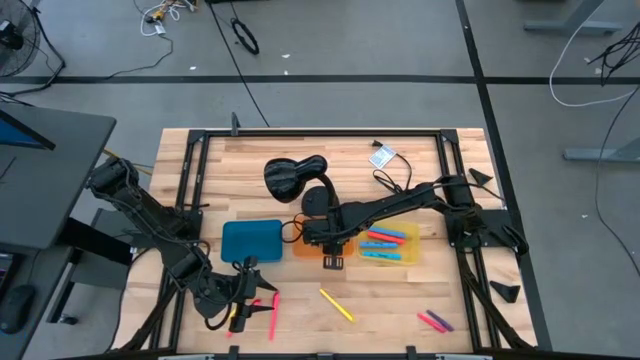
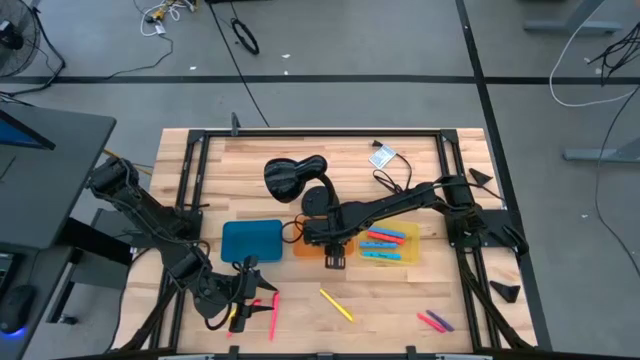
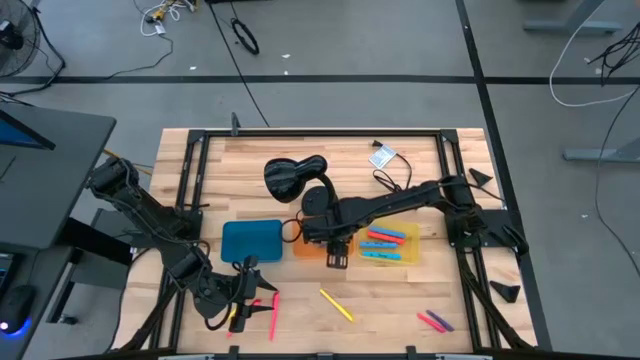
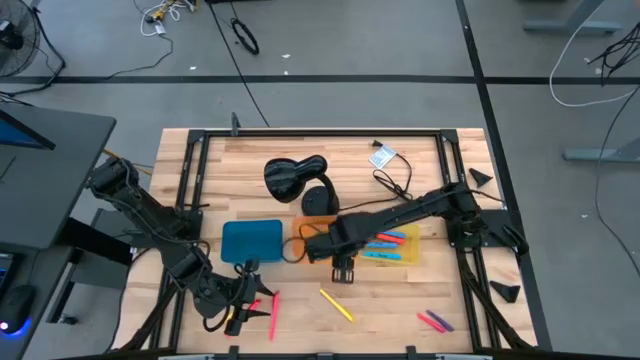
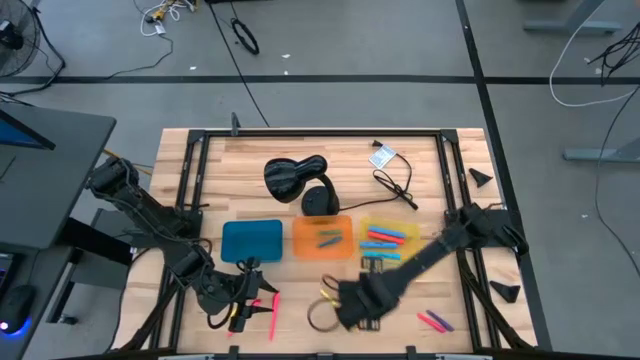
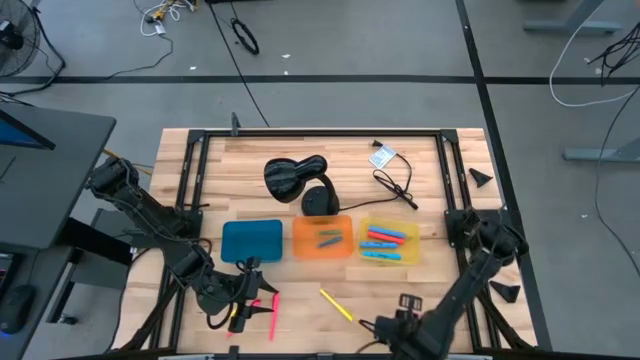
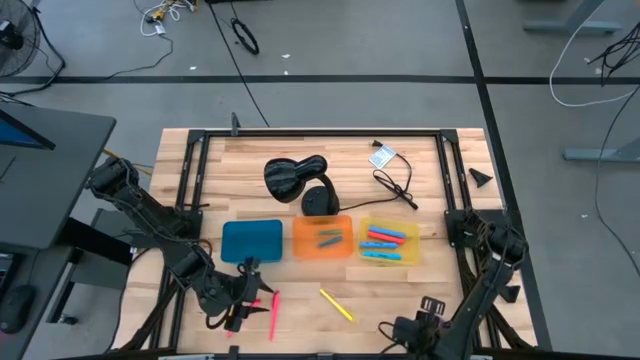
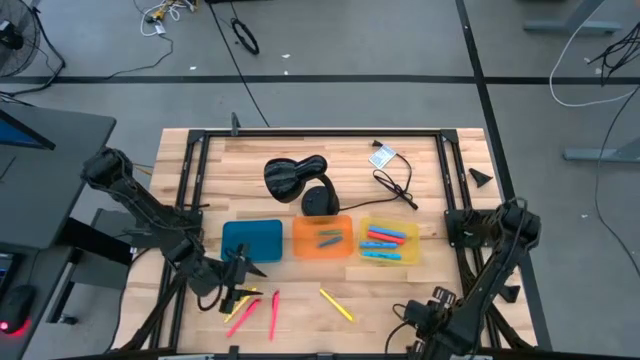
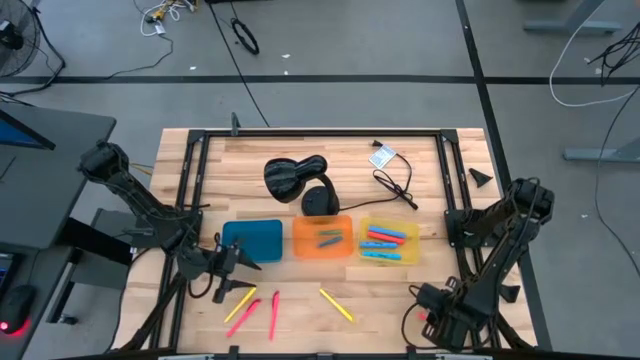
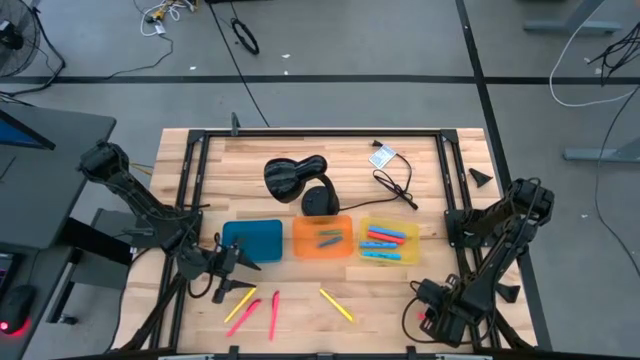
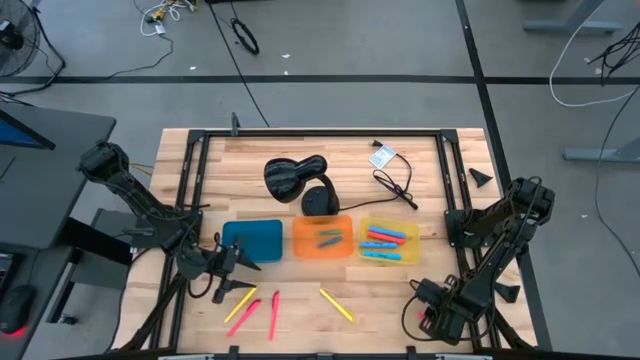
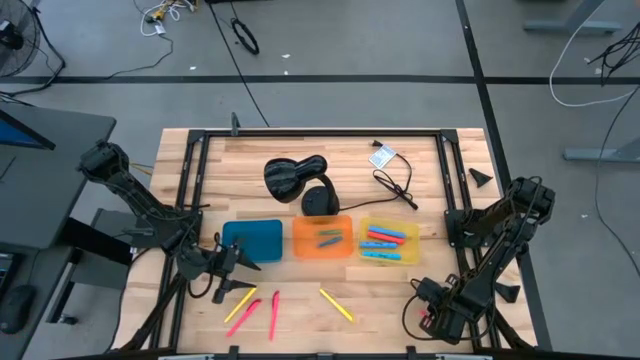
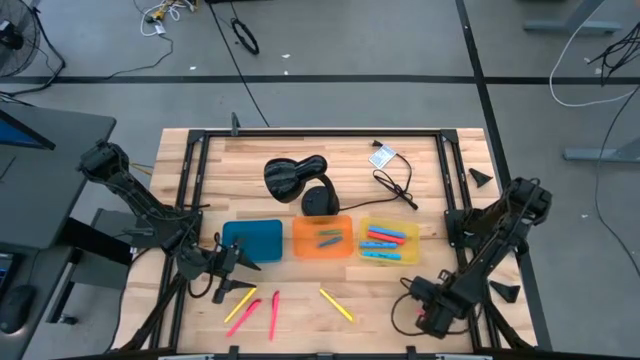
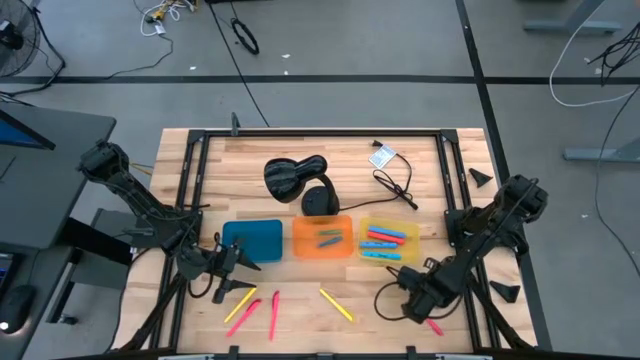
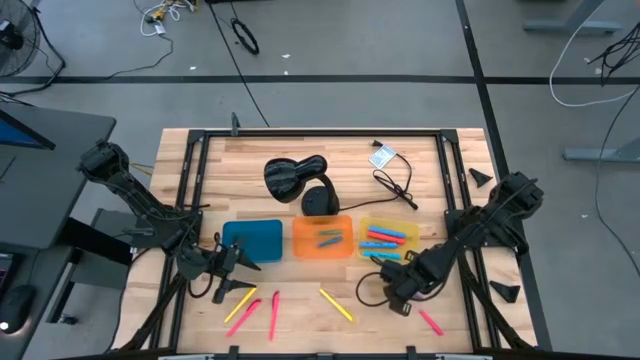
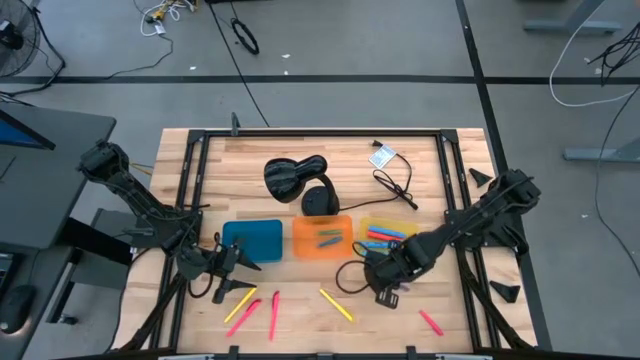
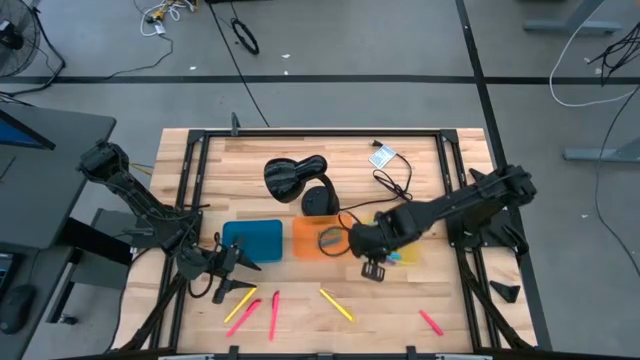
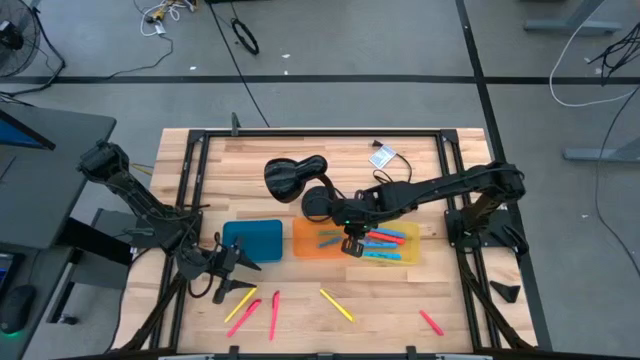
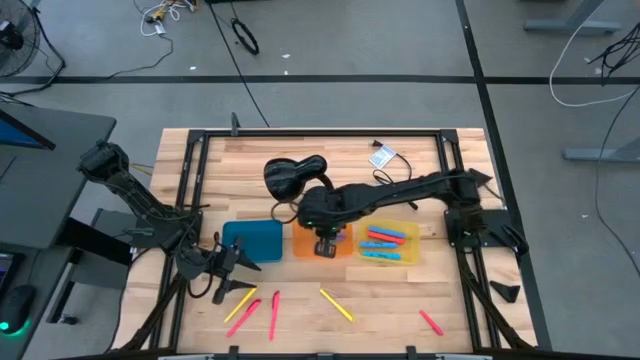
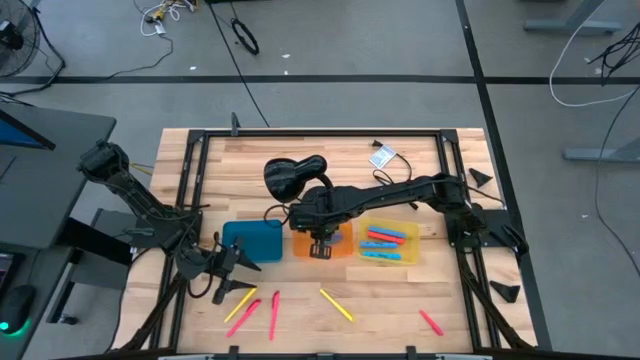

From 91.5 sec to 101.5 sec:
Task: Pick & Place Markers
Put the purple pen into the orange bin

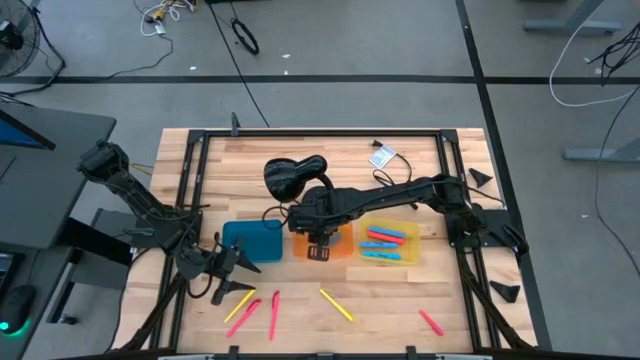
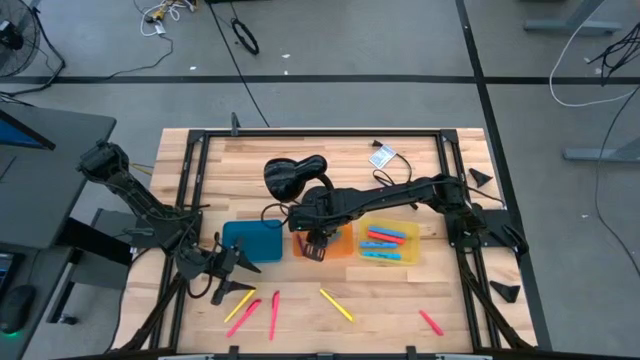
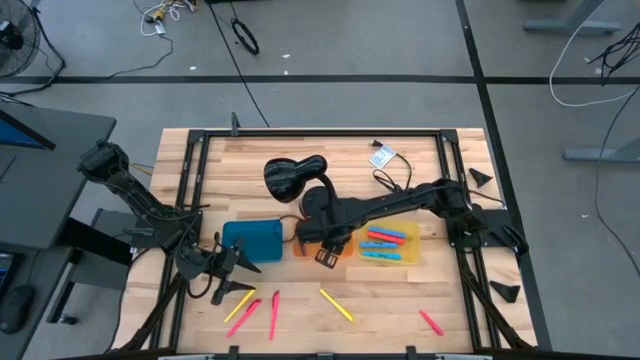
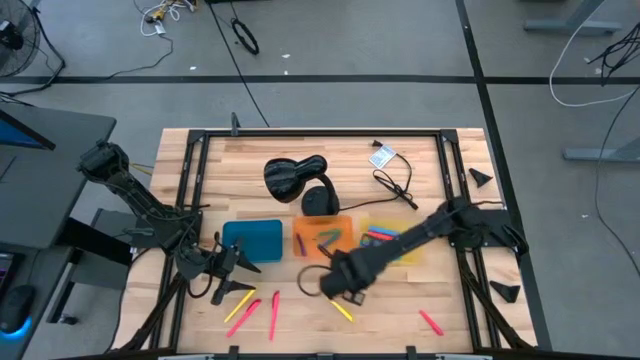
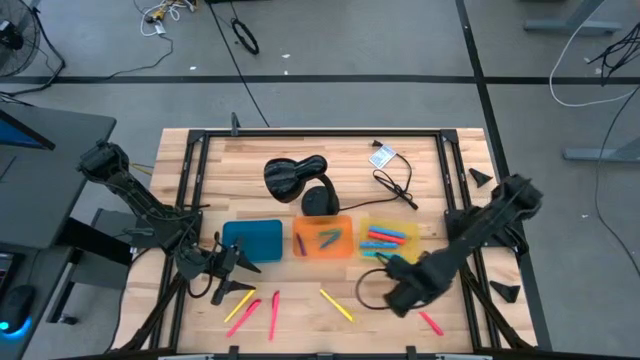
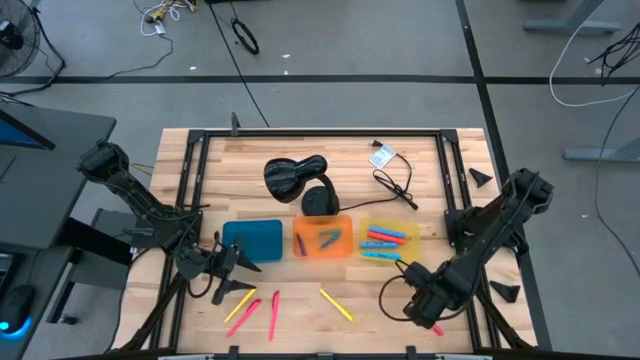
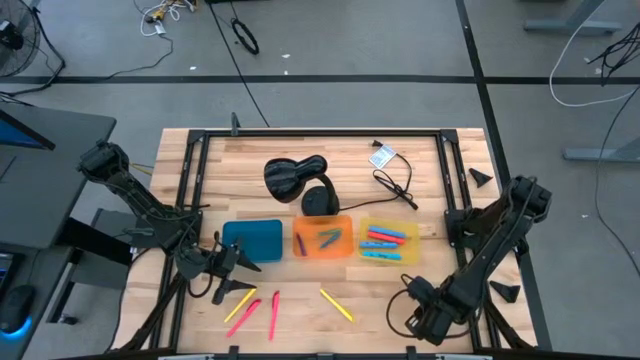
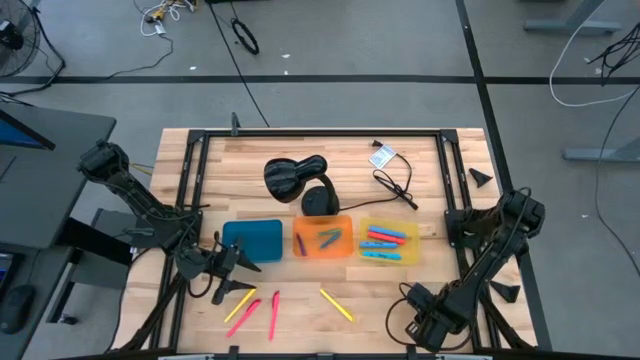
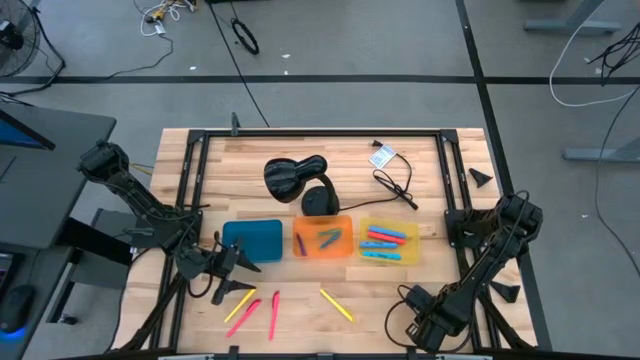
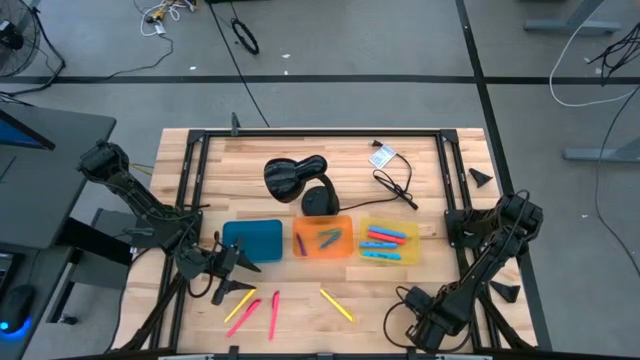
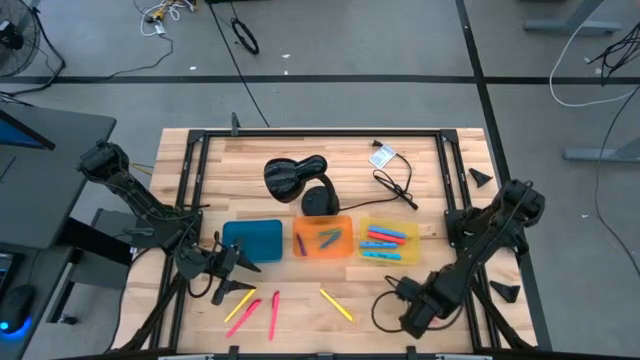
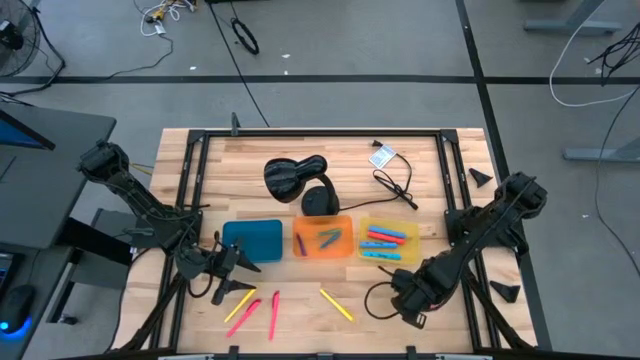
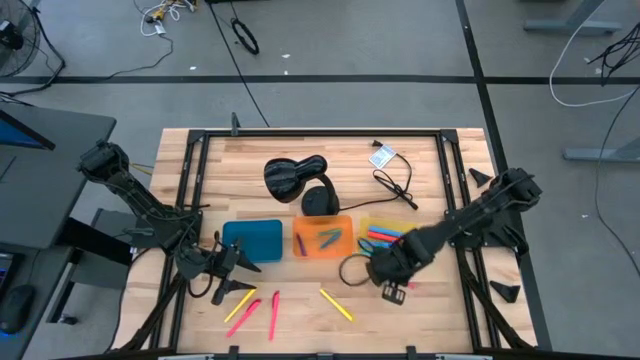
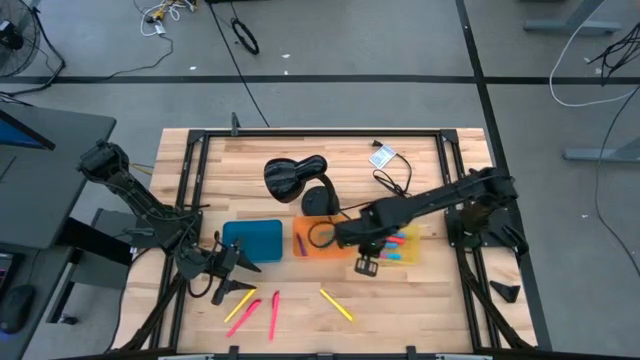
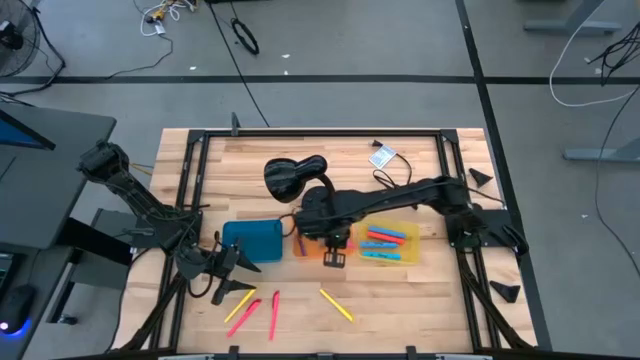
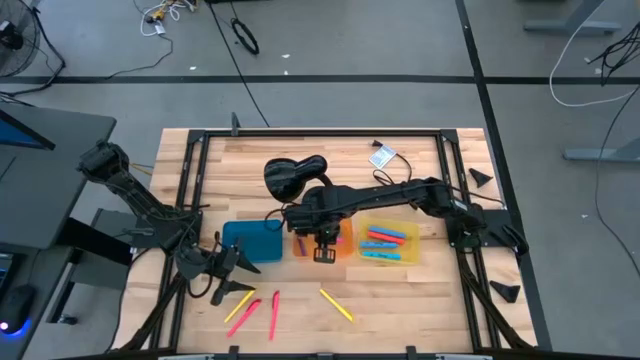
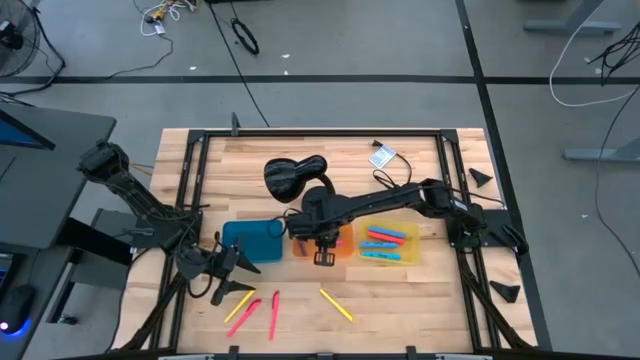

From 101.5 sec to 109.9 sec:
Put the pink pen into the orange bin

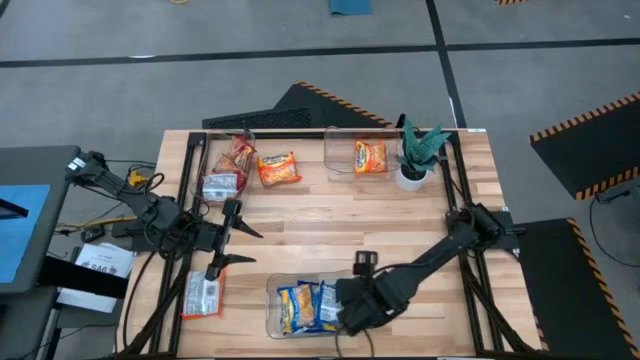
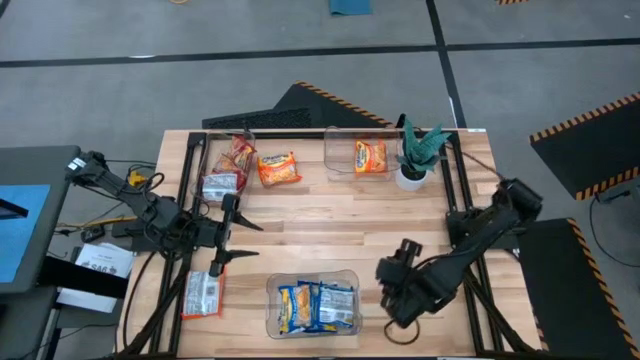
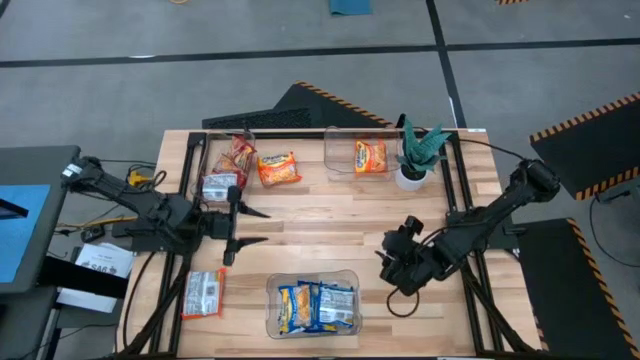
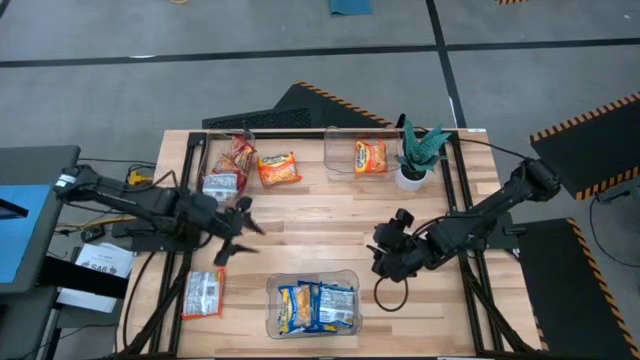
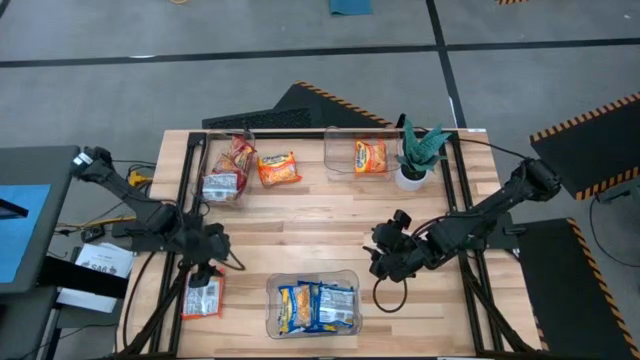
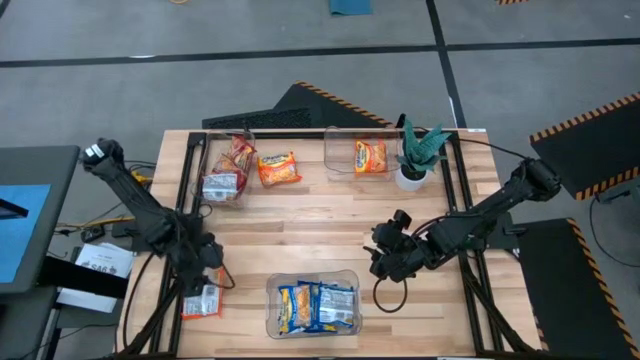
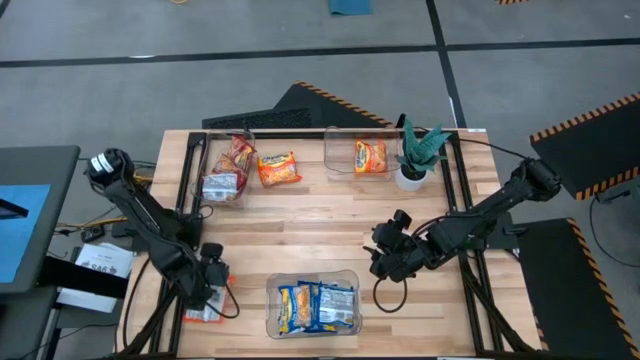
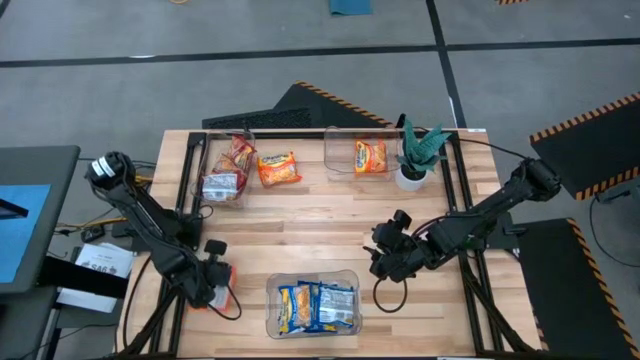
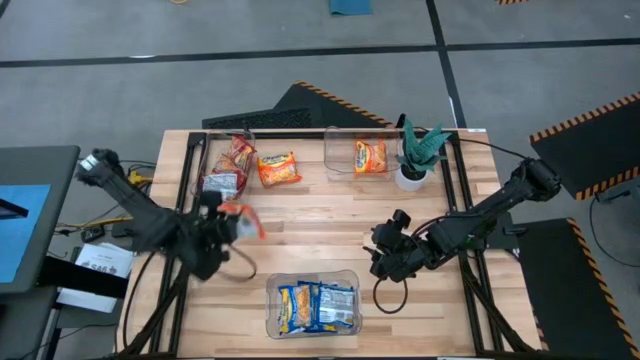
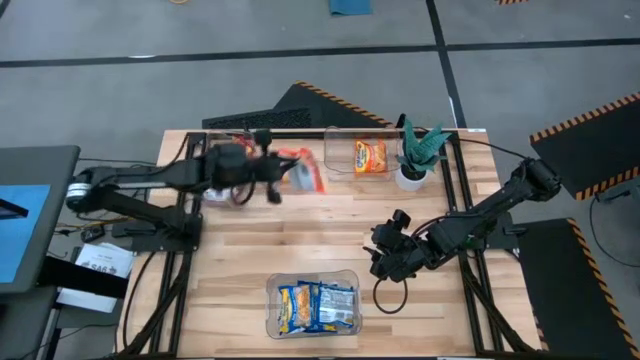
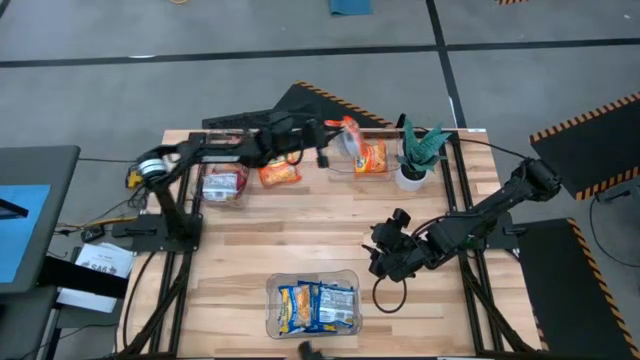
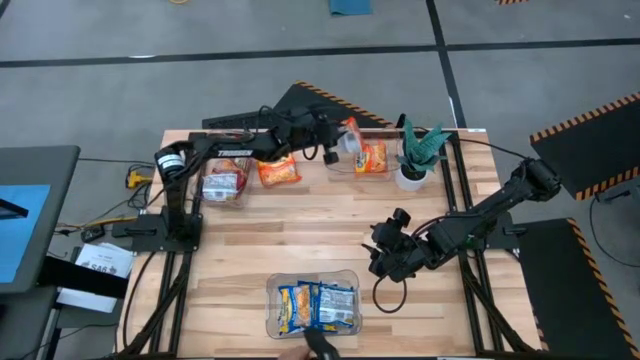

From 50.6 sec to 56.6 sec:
Task: Sort Maruchan noodles
Put the bottom orange noodle pack into the top right transparent bin
